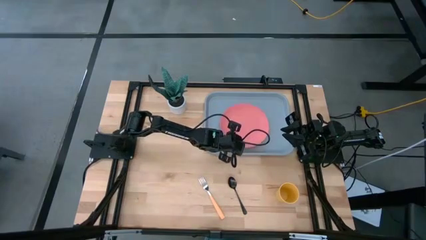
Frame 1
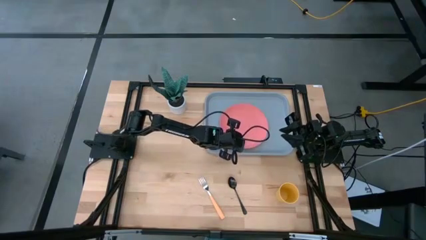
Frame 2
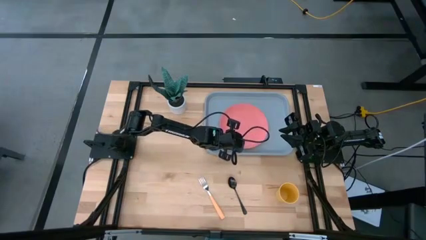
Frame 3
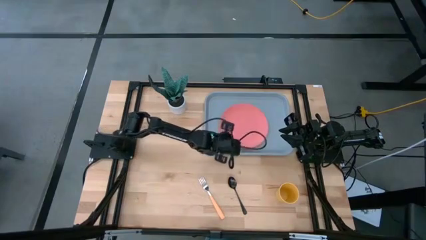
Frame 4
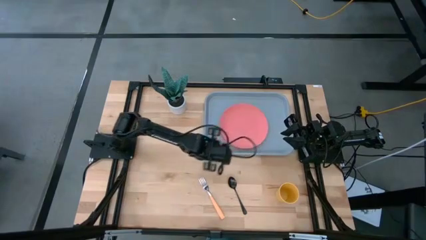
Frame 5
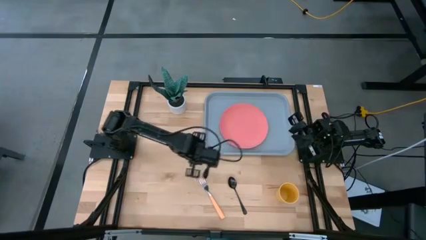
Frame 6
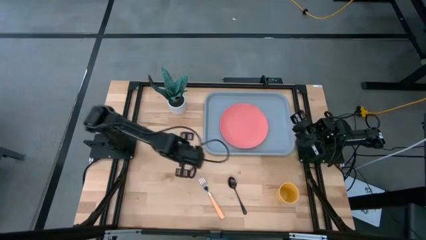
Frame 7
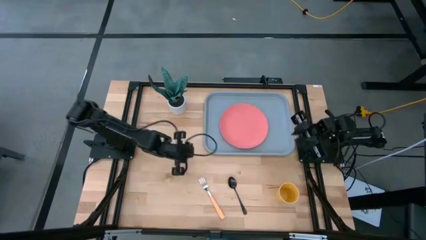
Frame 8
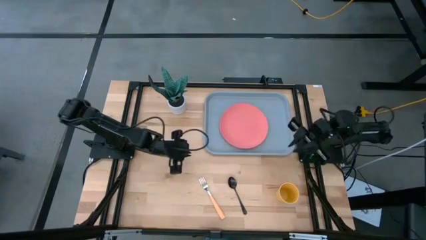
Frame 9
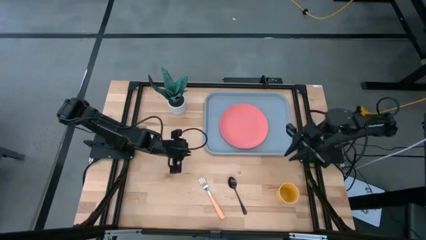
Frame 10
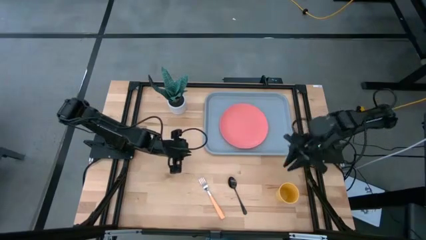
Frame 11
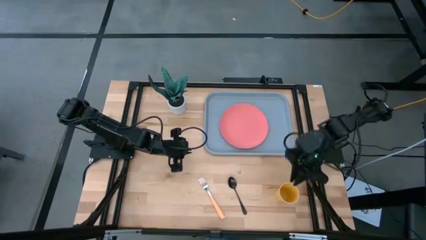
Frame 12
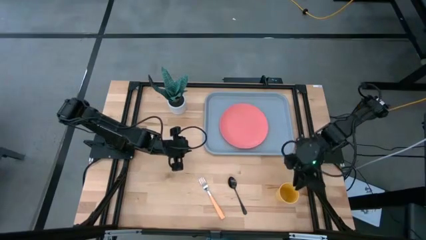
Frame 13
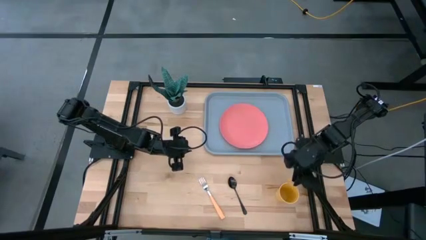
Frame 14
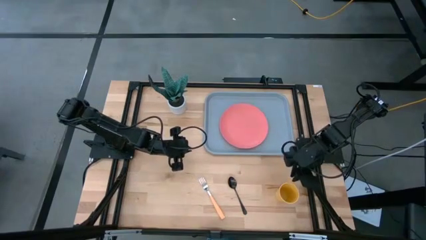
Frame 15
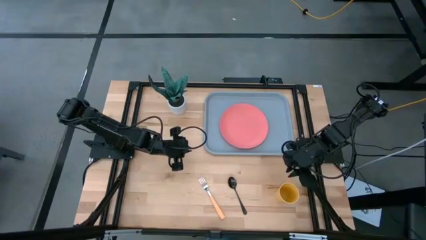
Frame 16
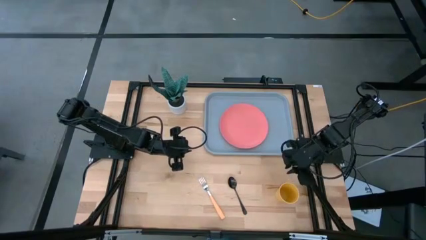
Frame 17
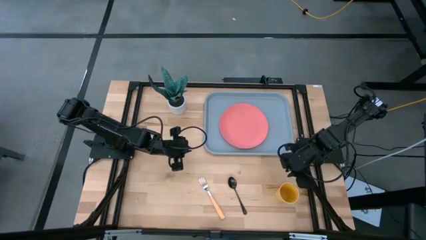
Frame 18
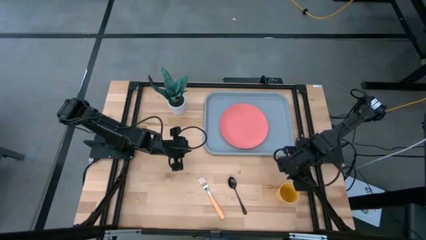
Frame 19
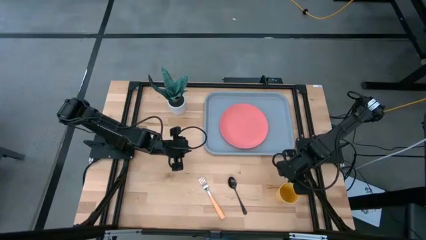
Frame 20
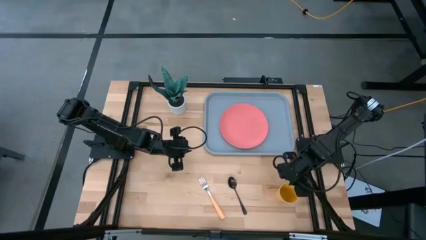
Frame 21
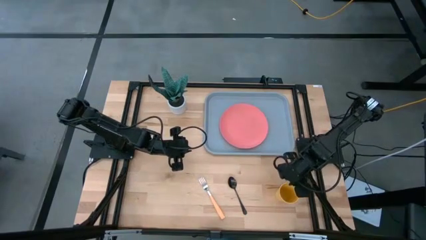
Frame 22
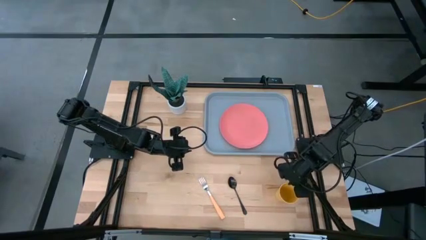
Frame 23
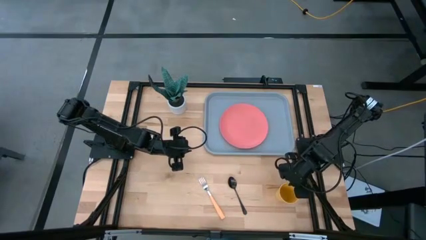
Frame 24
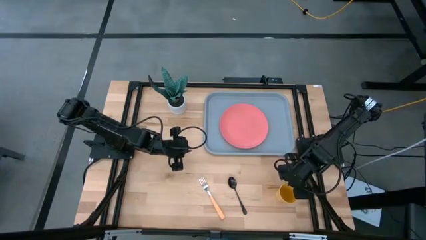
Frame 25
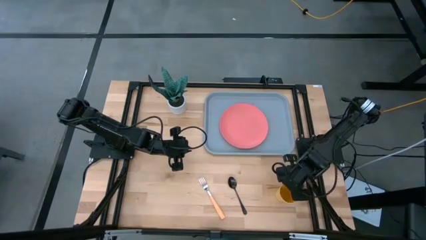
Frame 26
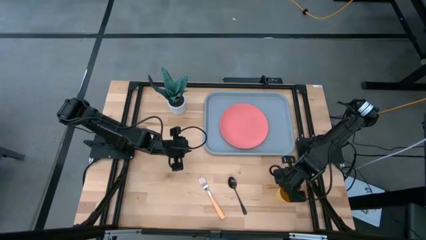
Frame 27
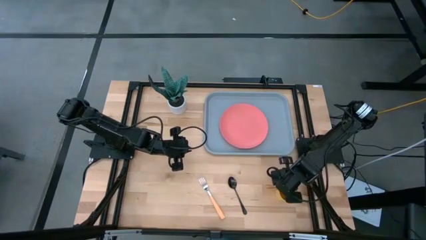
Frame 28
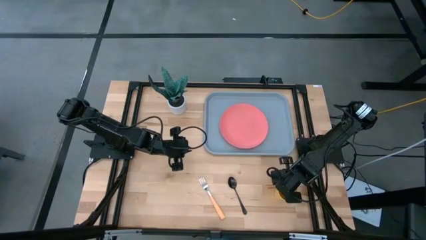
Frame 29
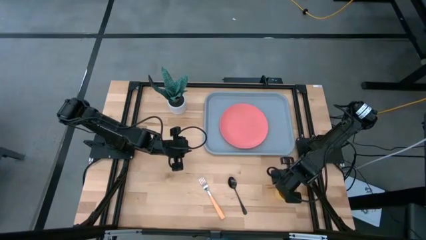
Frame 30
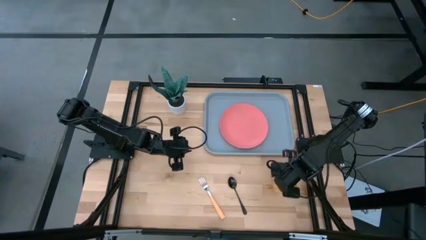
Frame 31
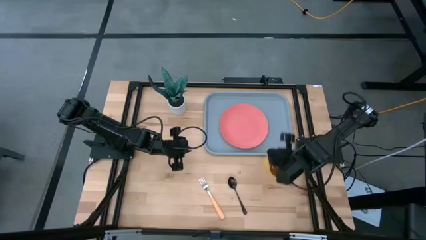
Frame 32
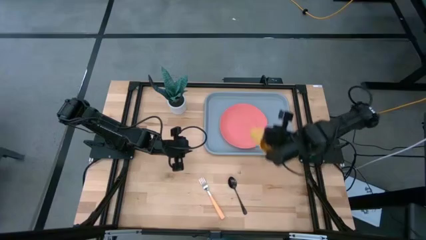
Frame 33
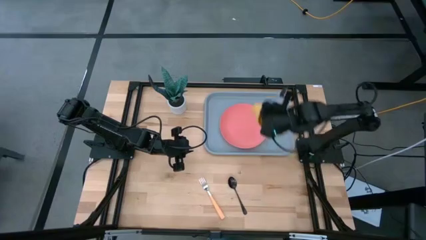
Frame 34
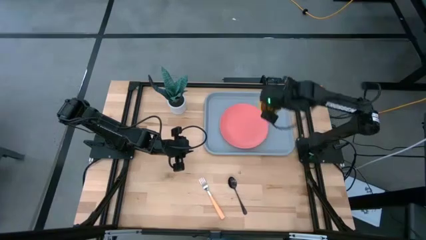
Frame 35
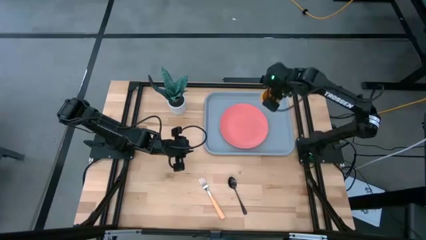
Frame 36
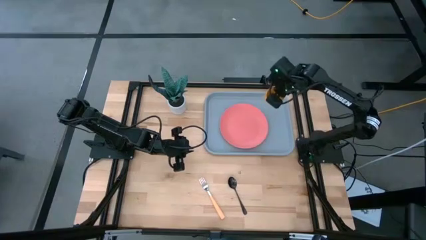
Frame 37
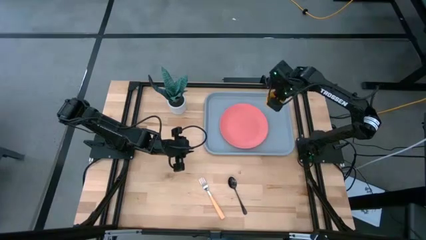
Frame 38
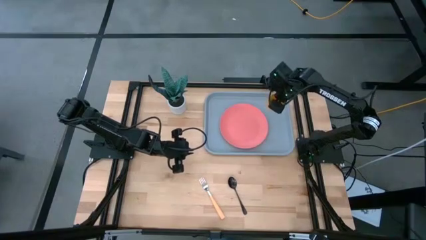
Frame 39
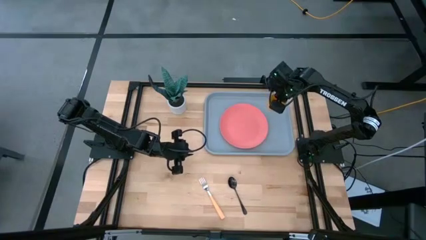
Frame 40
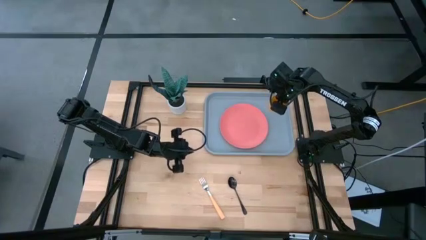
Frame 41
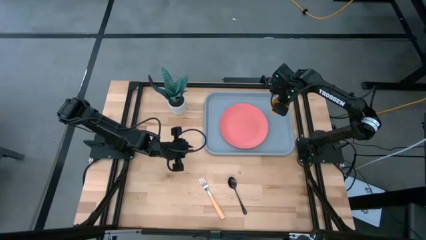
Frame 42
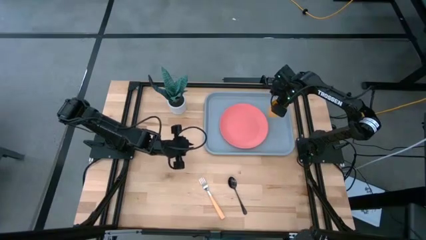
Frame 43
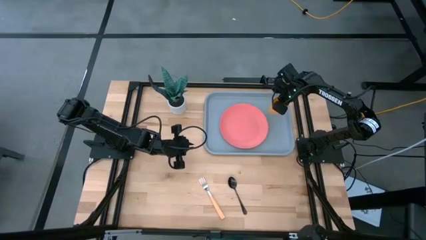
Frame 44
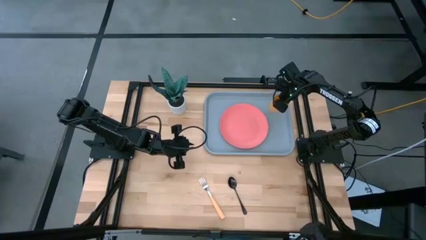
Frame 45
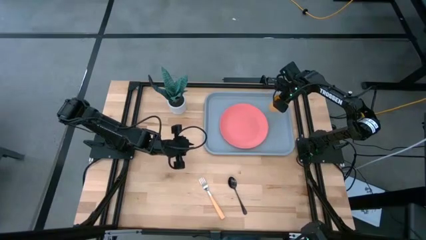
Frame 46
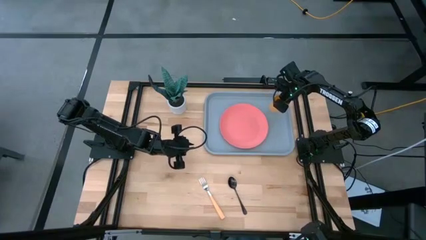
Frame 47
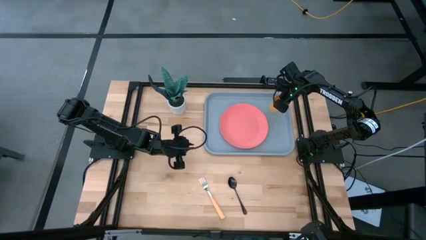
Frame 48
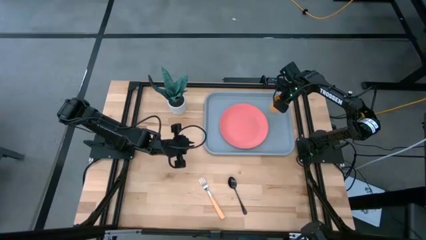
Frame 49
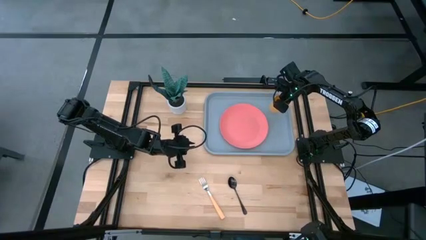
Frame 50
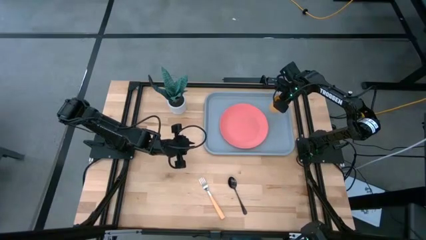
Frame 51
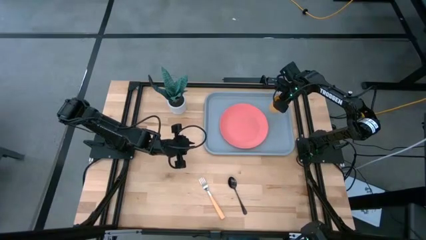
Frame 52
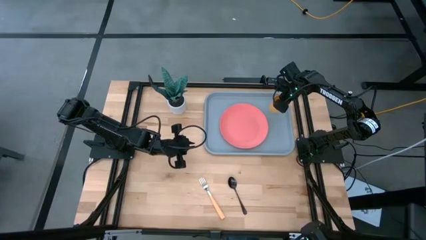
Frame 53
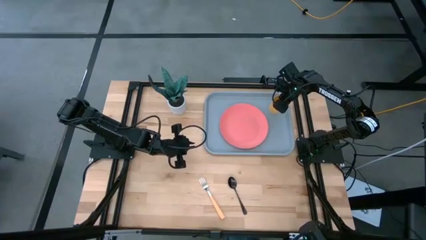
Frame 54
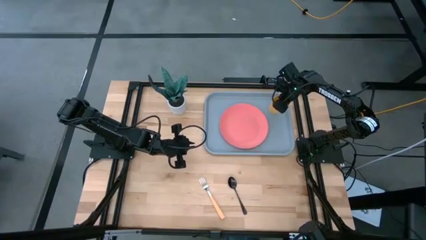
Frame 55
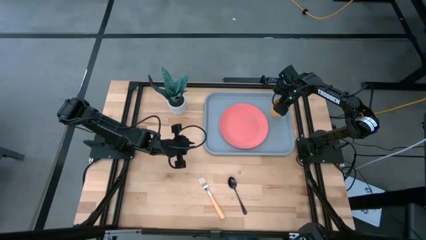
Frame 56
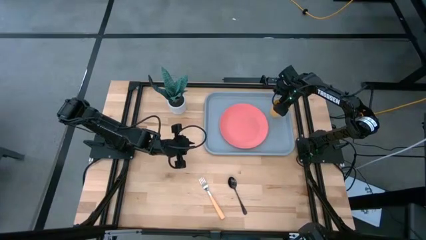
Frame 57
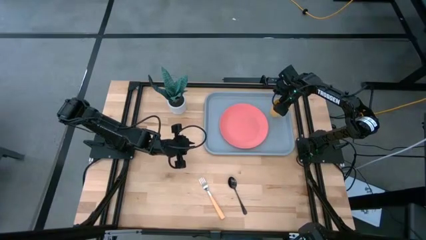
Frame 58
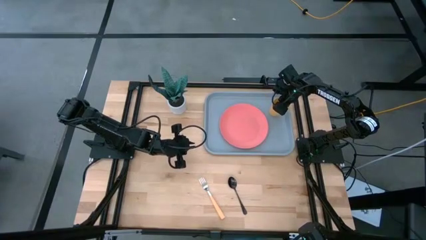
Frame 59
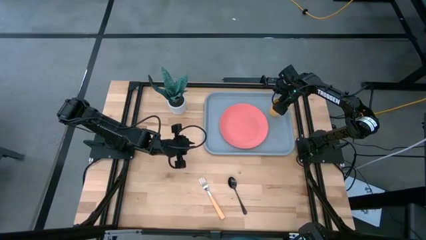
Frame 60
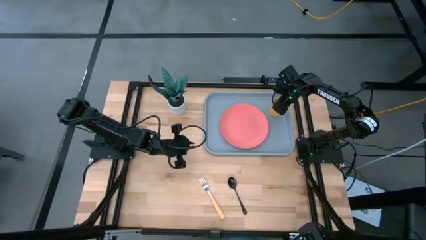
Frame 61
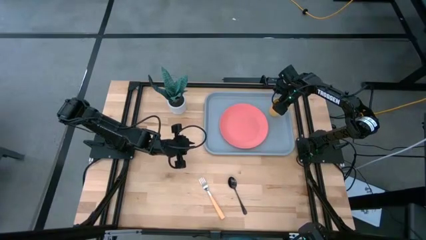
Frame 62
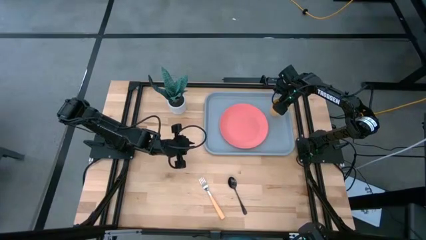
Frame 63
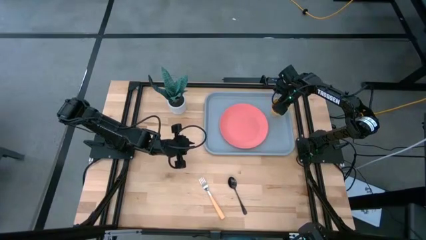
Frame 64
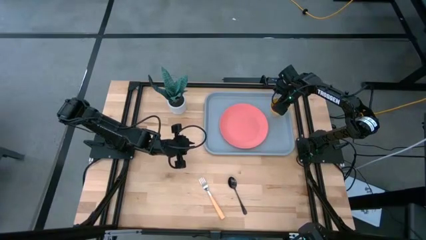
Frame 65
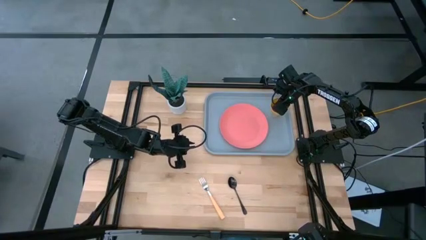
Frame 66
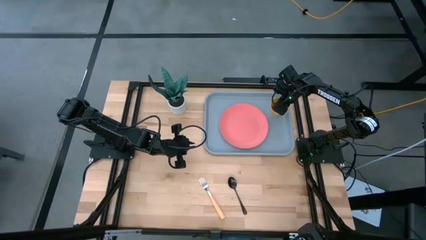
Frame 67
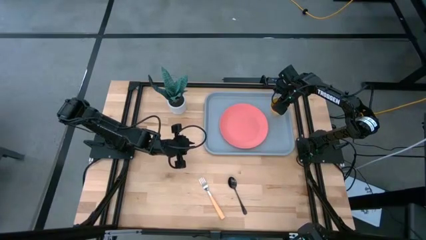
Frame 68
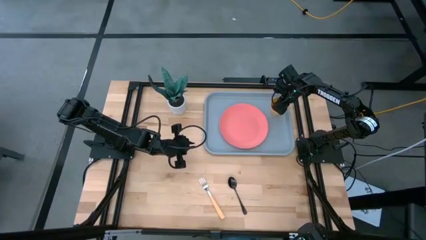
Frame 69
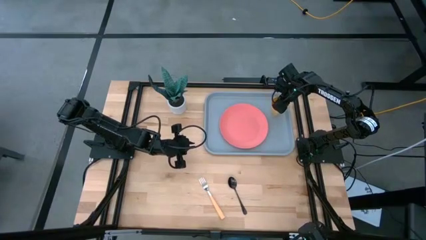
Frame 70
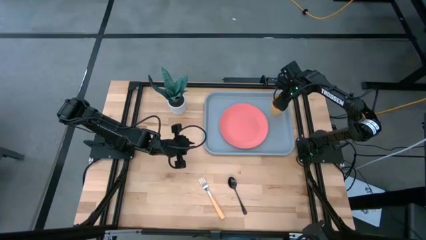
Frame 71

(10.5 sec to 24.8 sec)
Task: Pick and place plate/cup/fork/spoon on tray
Put the yellow cup to the top right of the pink plate on the blue serving tray
